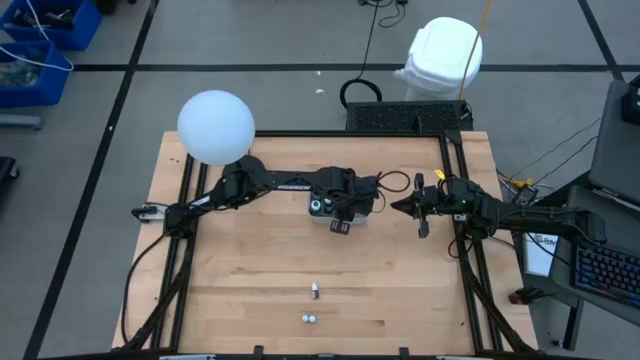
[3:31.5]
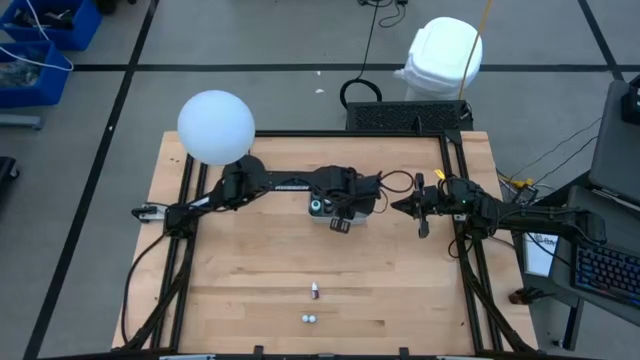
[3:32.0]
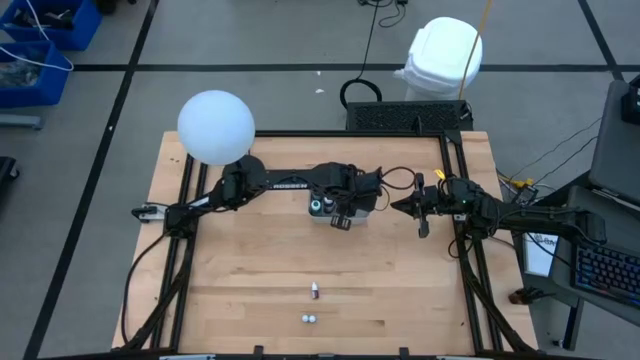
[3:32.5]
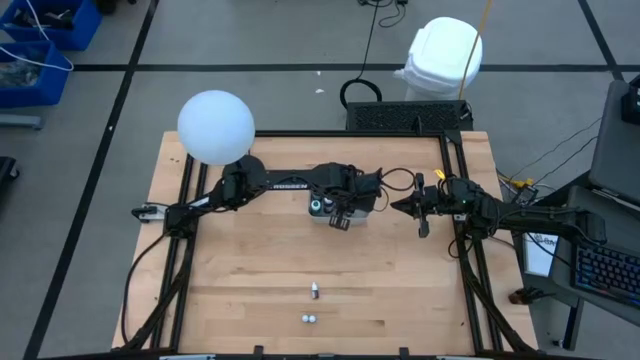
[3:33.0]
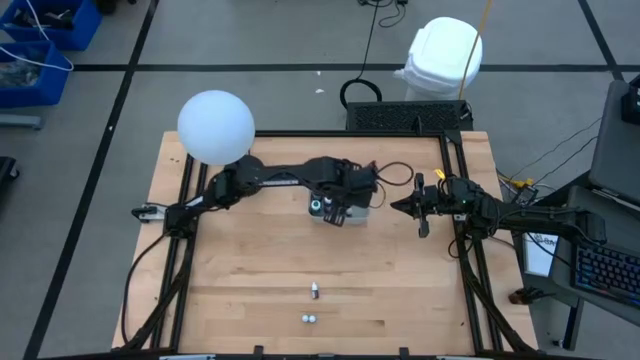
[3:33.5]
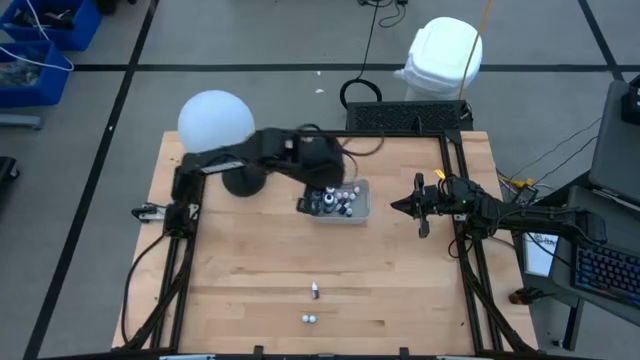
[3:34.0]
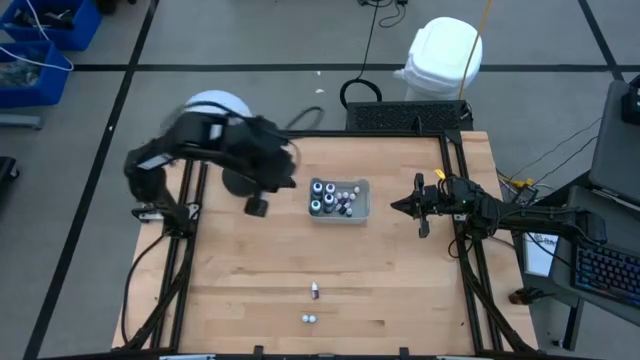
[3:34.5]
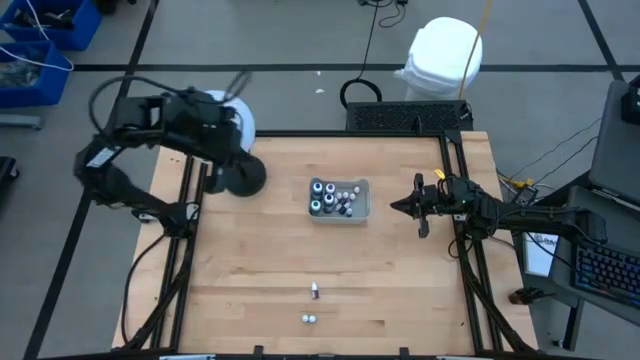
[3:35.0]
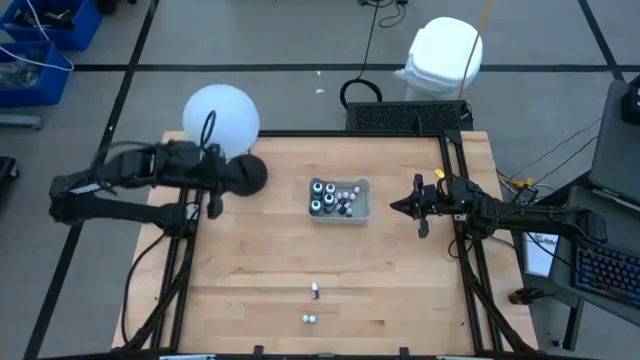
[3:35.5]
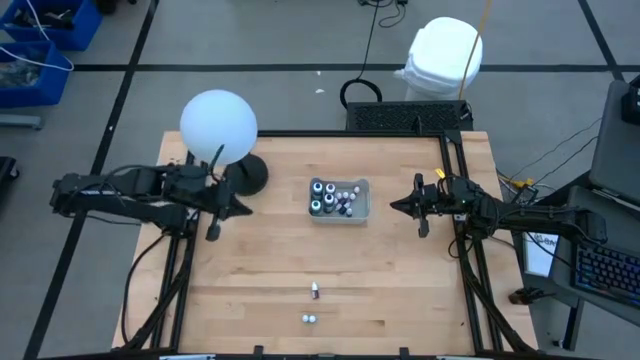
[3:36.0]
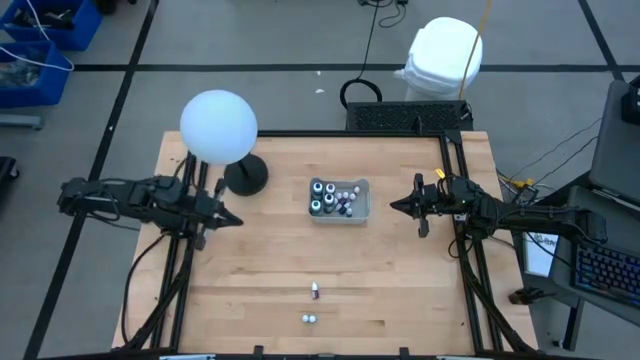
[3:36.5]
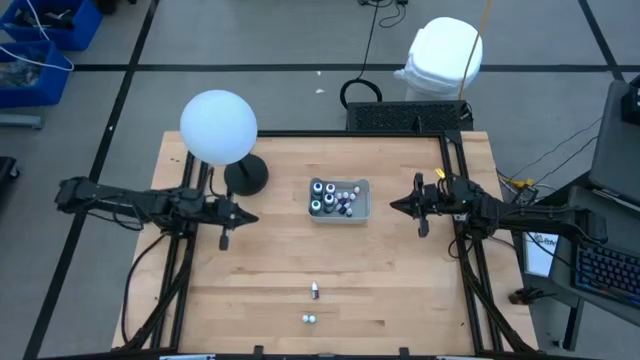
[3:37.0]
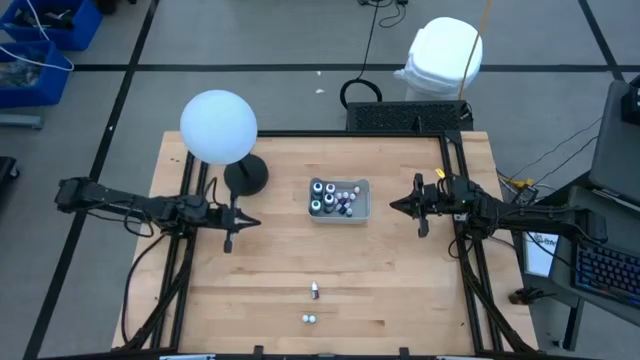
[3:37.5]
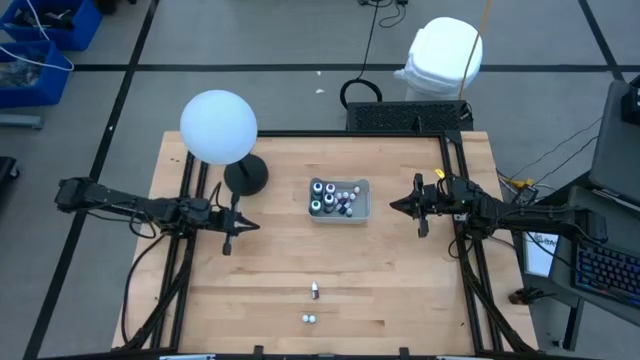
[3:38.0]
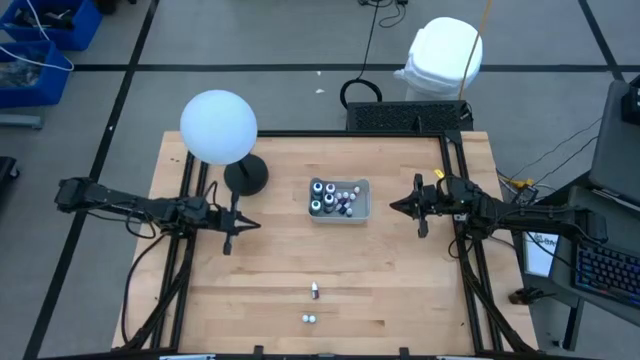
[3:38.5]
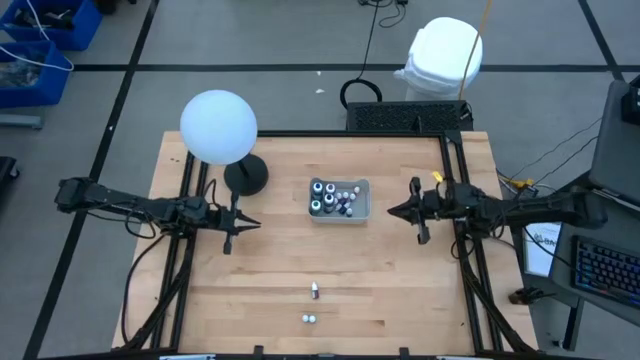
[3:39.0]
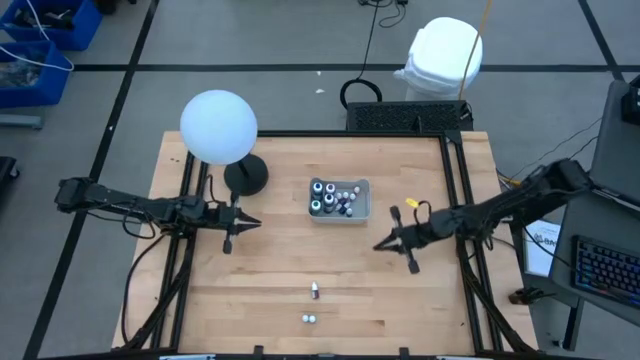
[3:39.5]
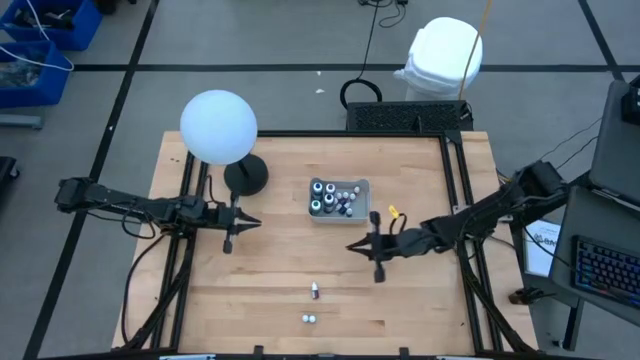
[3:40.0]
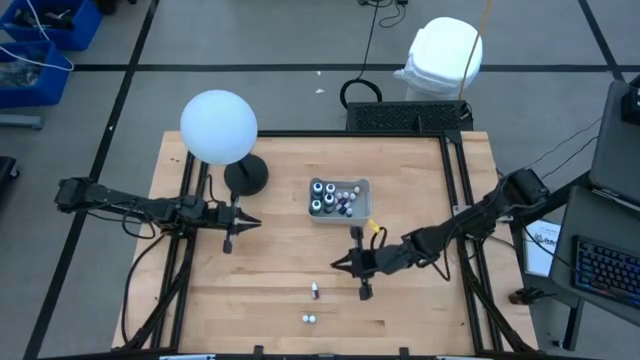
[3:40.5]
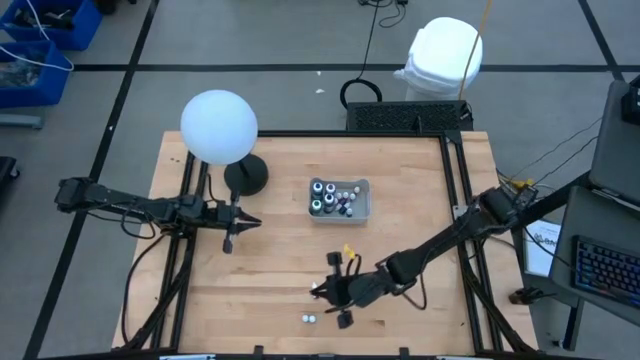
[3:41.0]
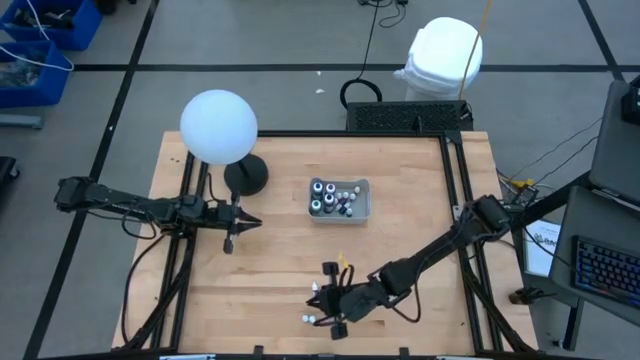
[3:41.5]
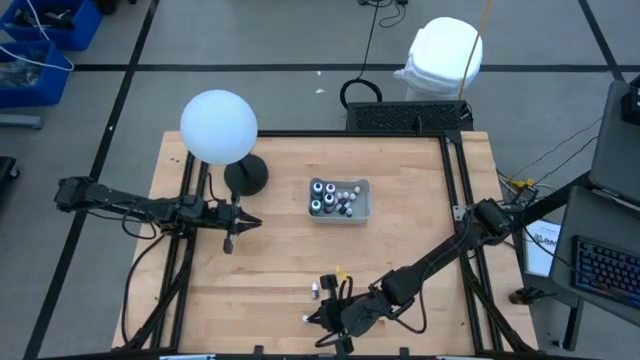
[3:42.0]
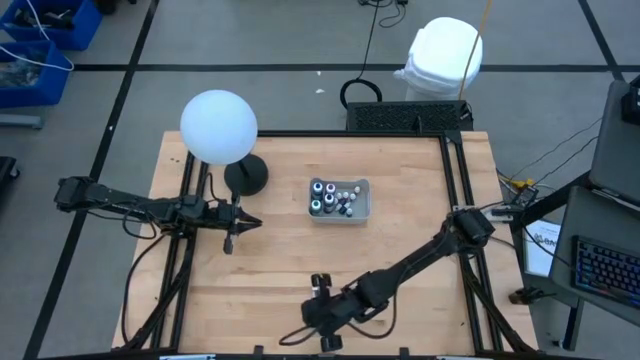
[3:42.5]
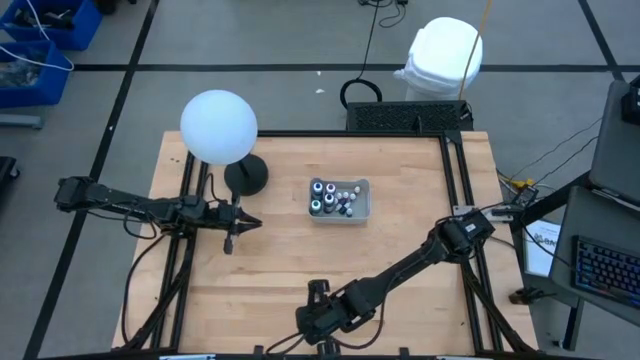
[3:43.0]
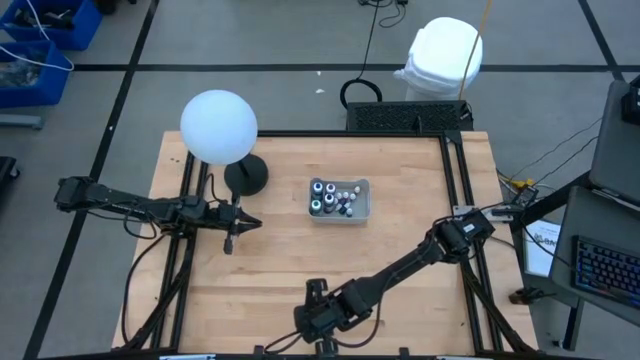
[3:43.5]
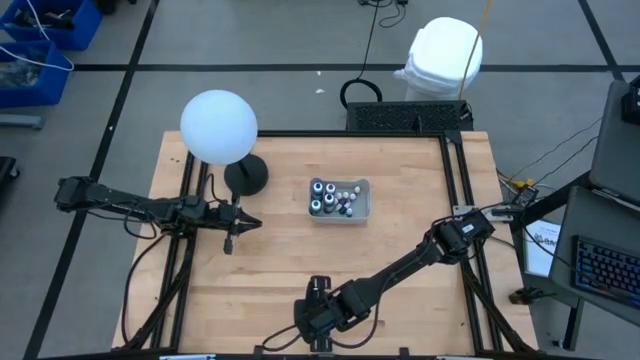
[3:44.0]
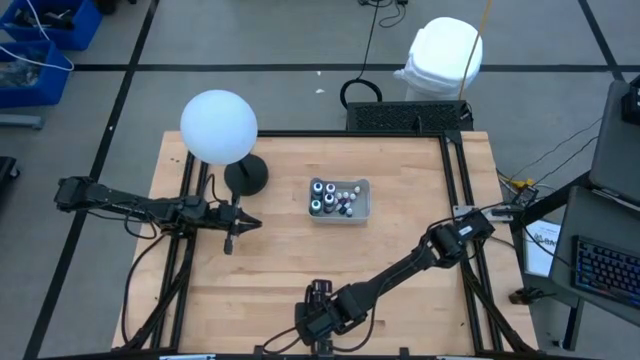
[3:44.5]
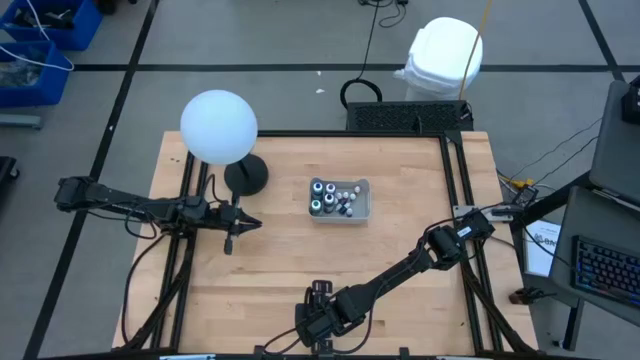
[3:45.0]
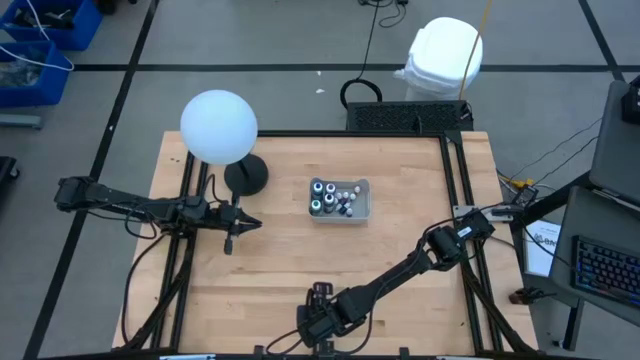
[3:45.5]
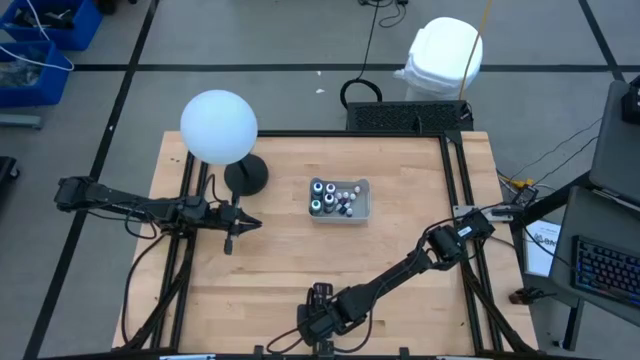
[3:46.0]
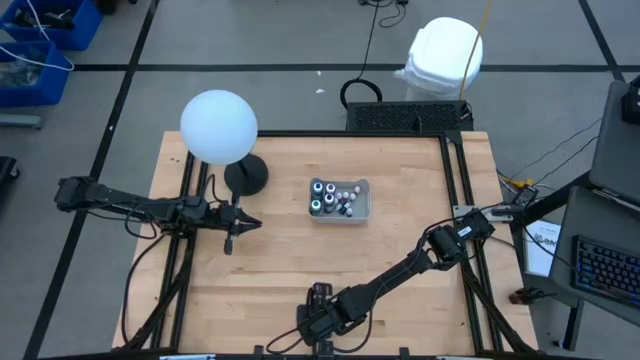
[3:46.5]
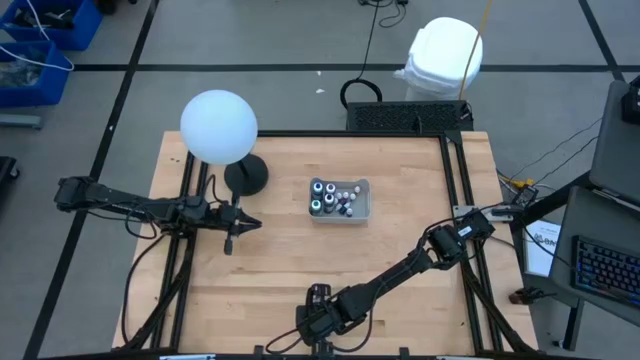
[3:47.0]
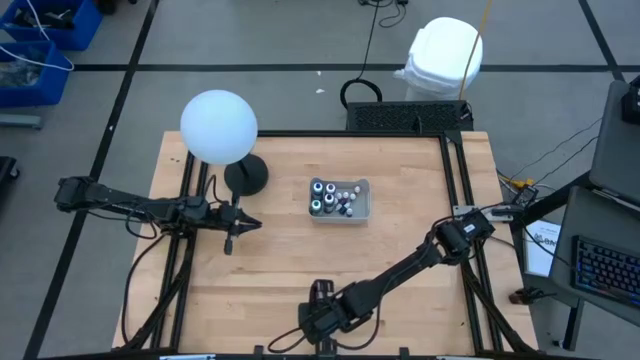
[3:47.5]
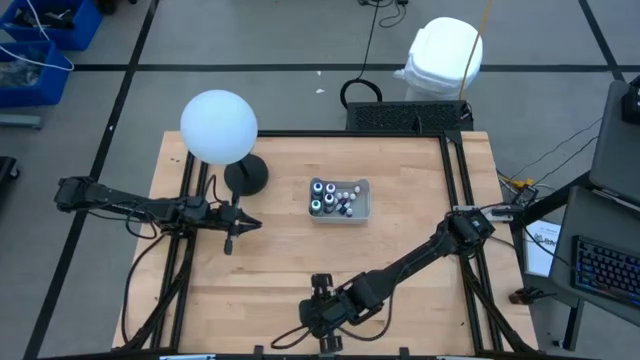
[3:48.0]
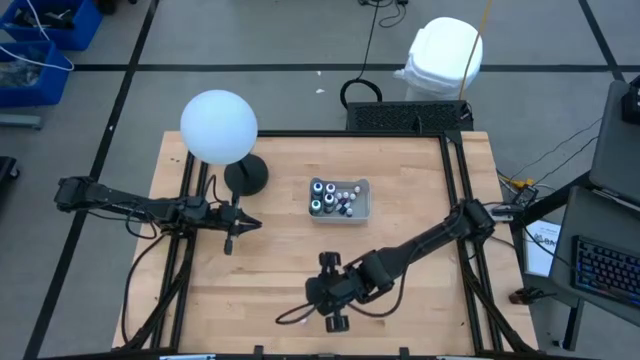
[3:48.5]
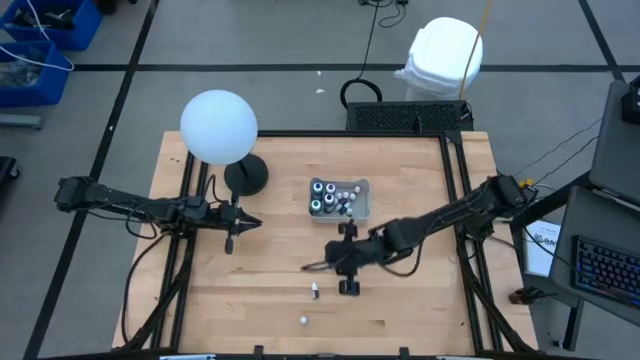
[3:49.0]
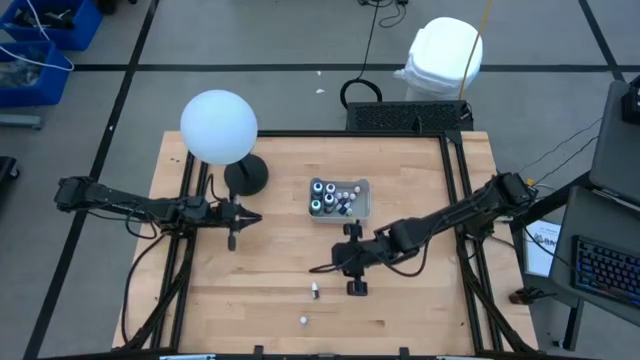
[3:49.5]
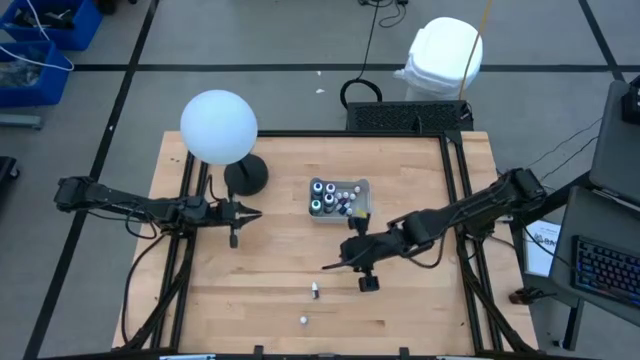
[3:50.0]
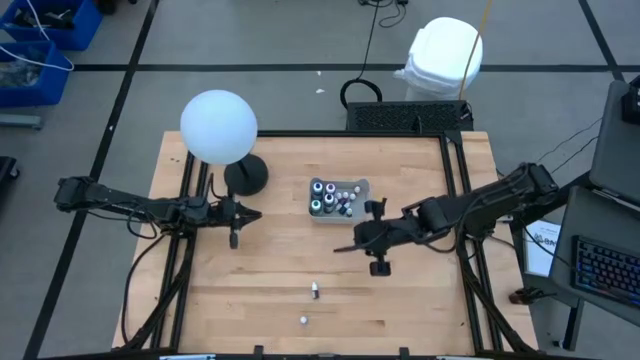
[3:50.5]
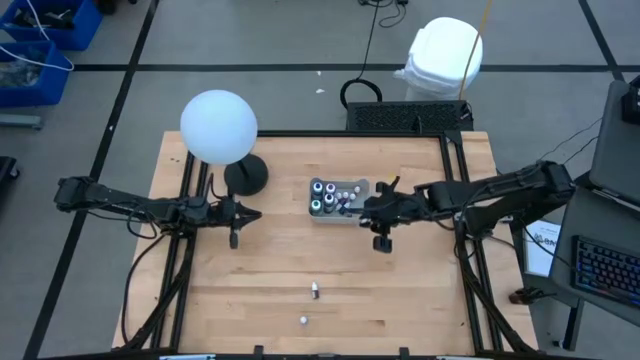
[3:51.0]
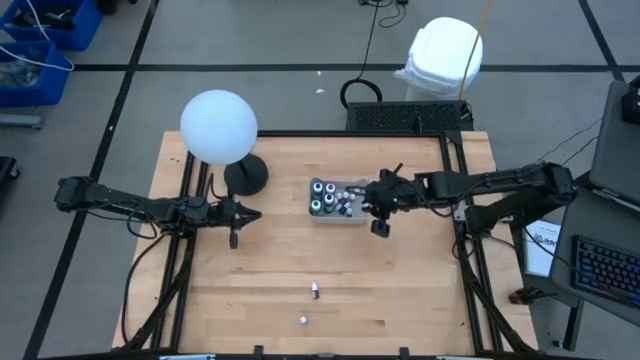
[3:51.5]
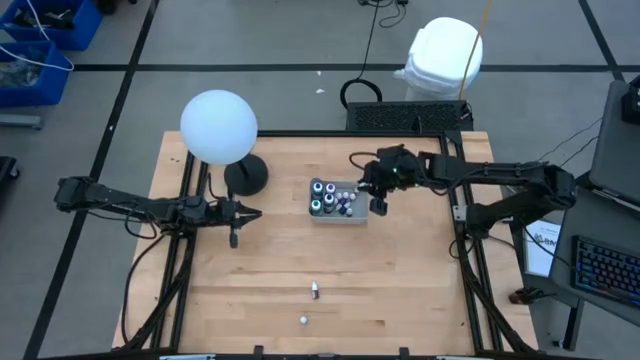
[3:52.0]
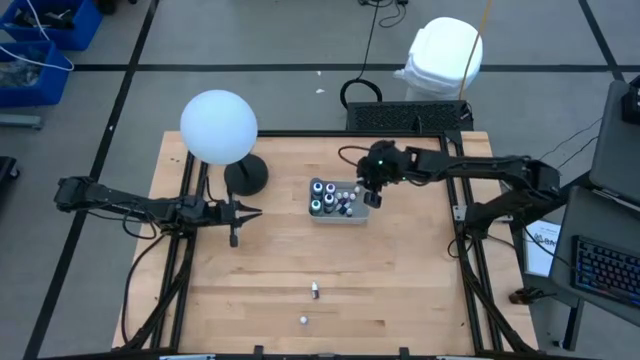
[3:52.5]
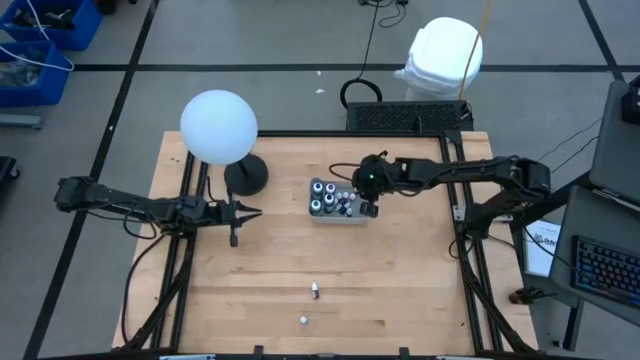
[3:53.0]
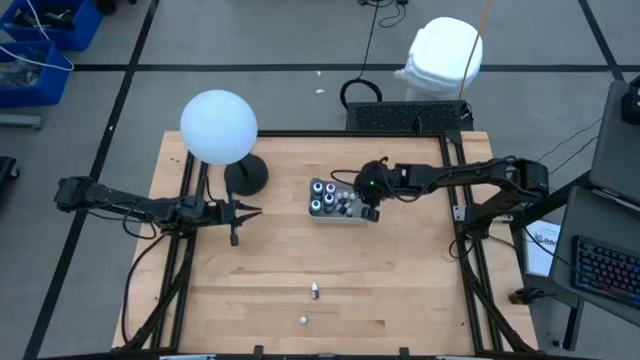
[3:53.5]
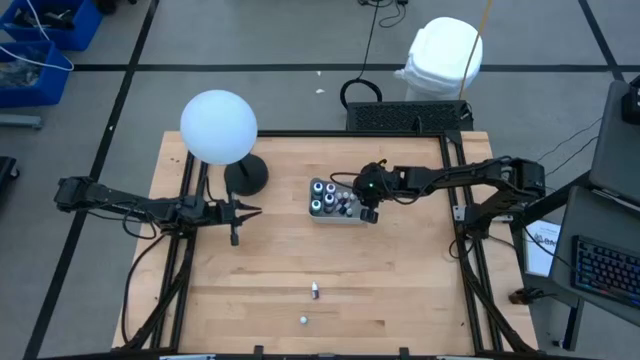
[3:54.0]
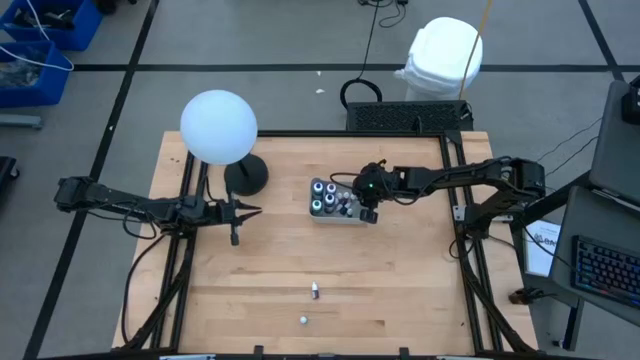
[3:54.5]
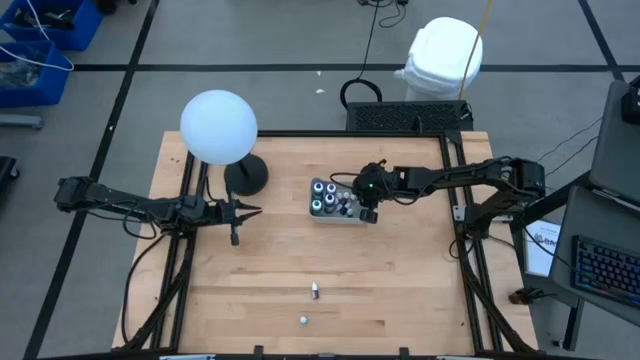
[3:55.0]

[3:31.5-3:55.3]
Task: Pick & Place food coloring
Put the small blue food coloring bottle into the gray bin
